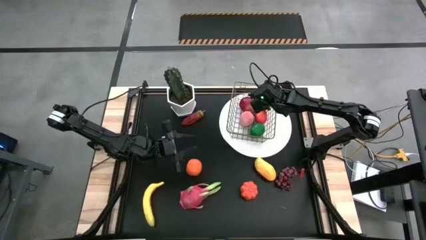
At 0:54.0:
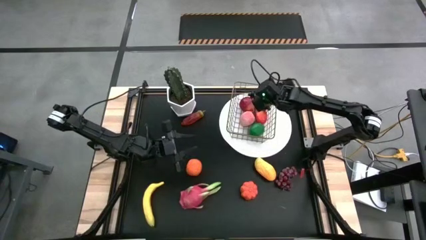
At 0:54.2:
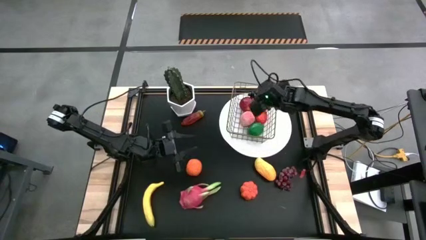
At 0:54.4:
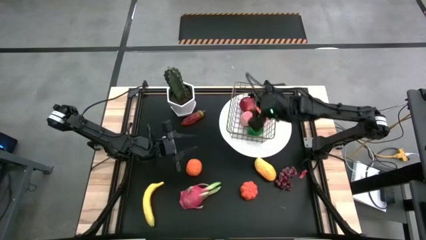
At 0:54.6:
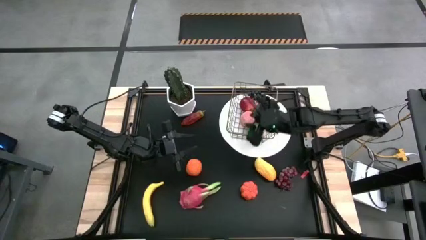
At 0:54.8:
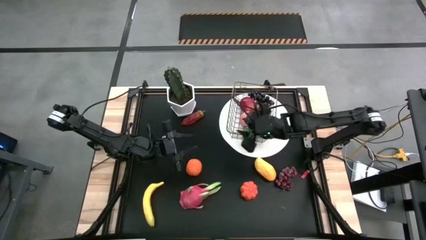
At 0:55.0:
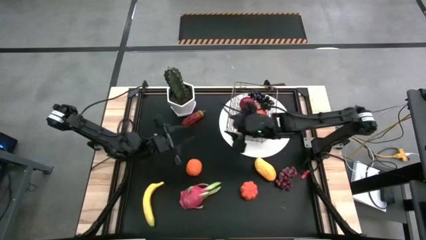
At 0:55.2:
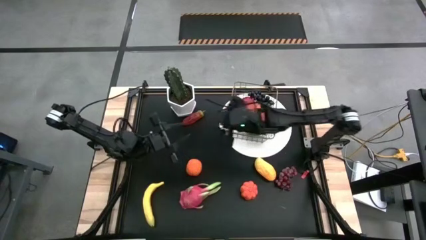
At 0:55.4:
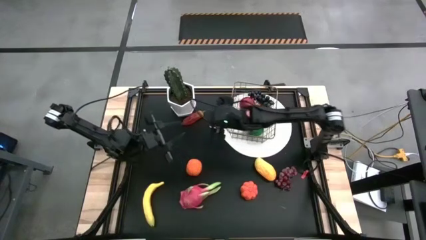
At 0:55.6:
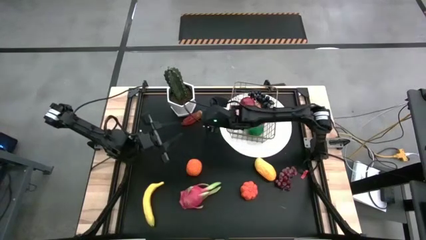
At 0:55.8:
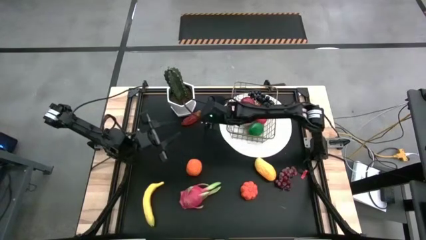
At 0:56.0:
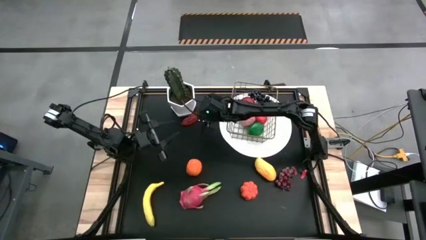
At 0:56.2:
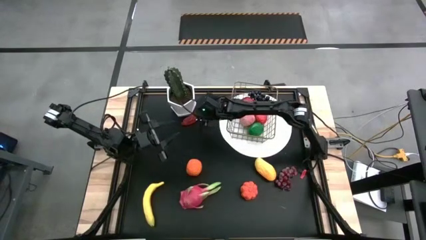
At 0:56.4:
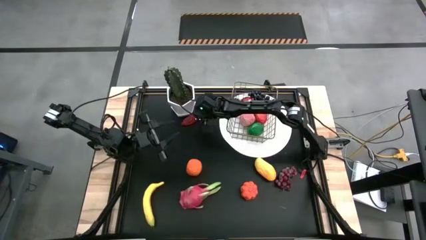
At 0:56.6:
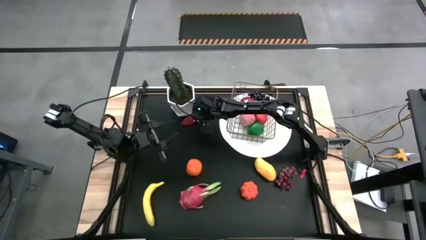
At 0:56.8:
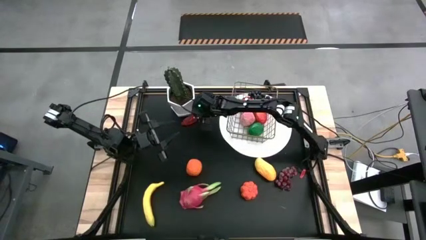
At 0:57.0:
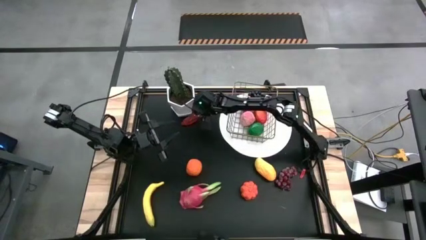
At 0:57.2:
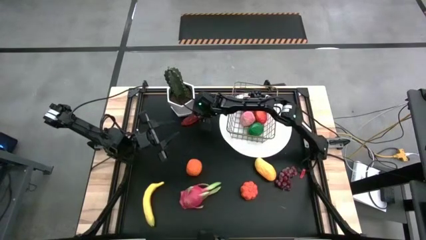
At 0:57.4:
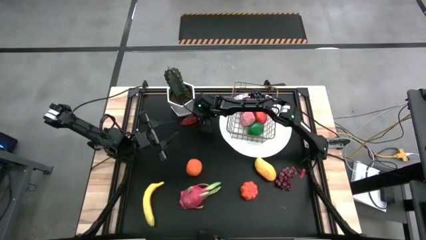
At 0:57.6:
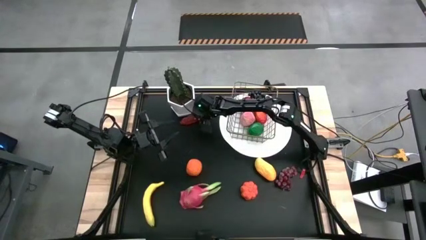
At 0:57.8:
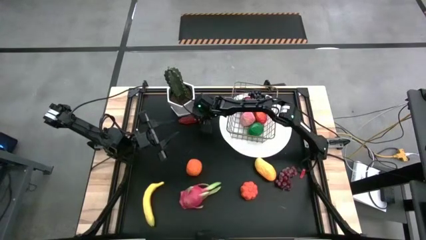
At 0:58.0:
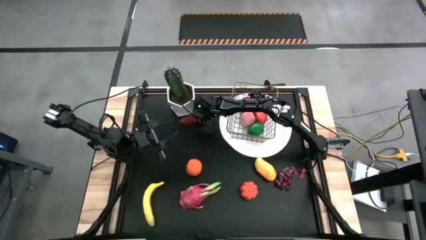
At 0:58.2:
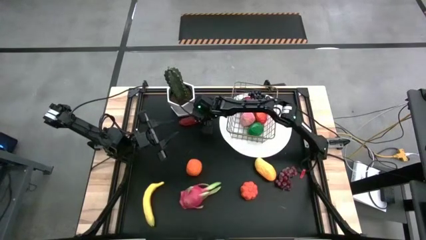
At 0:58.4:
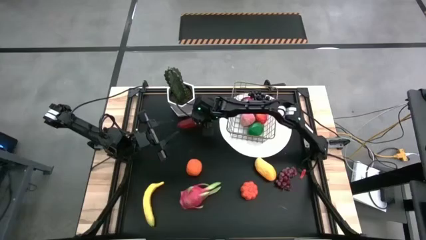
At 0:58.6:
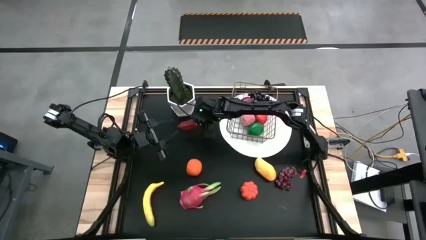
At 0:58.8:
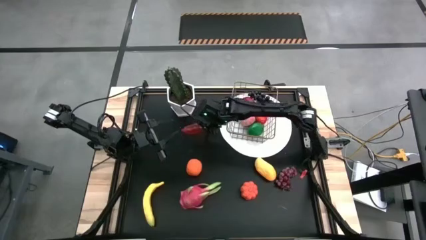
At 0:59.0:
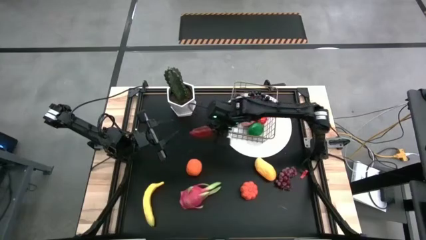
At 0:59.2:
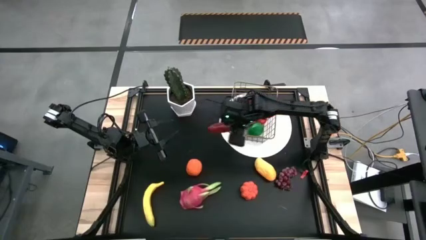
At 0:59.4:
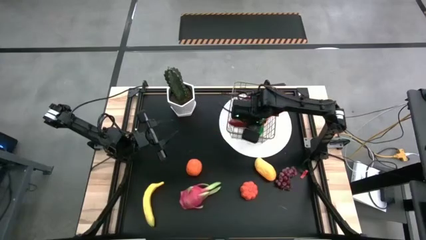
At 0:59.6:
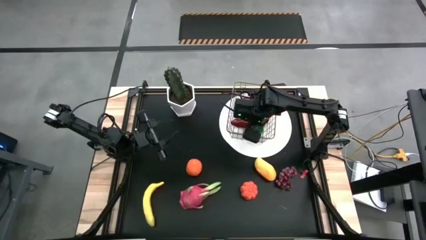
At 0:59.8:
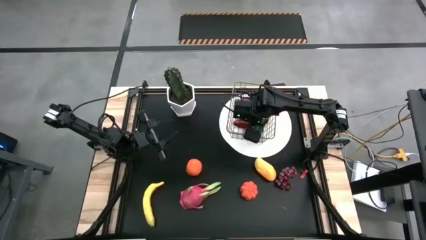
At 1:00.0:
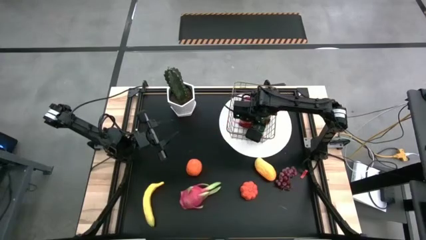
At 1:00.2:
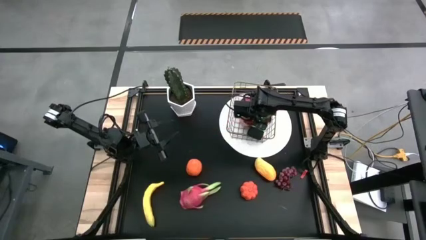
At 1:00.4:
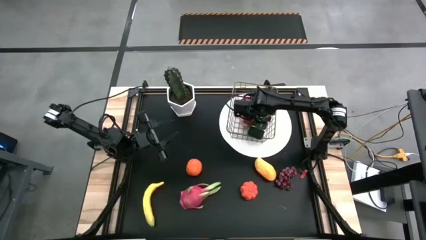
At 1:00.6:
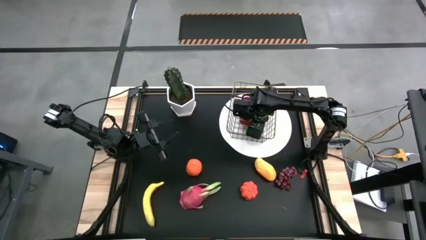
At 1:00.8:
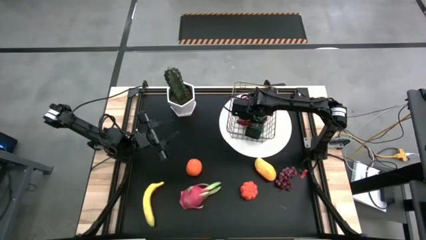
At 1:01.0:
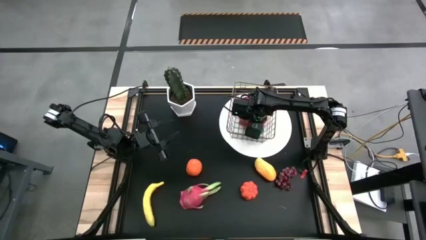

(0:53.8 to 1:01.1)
Task: Build produce basket
Put the chili pepper into the wire basket

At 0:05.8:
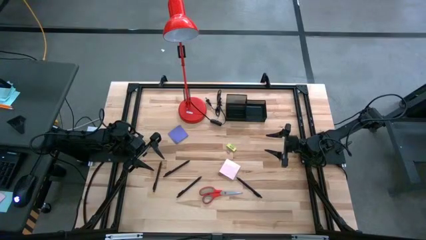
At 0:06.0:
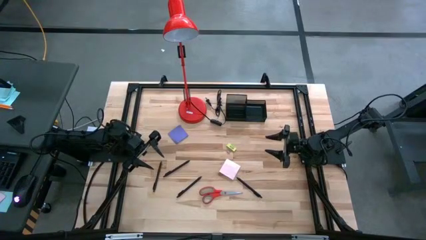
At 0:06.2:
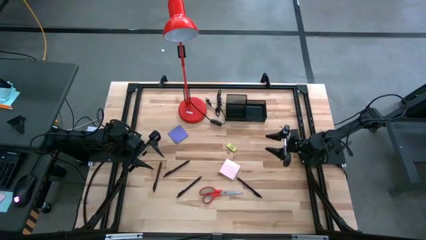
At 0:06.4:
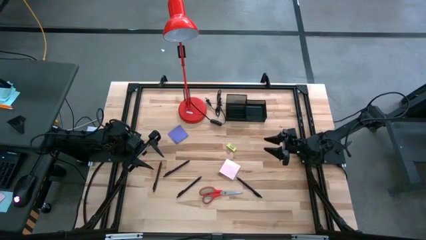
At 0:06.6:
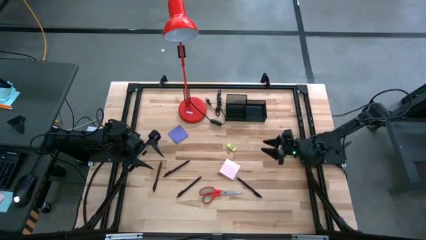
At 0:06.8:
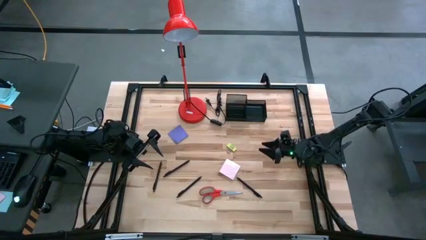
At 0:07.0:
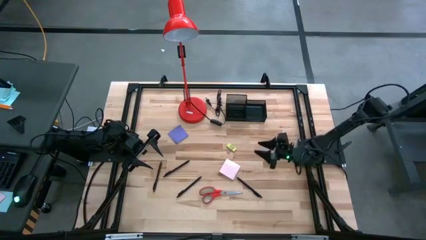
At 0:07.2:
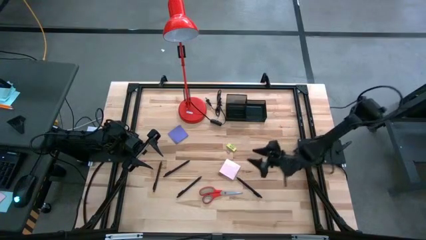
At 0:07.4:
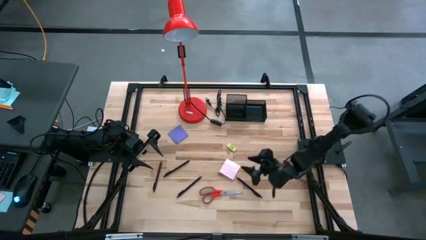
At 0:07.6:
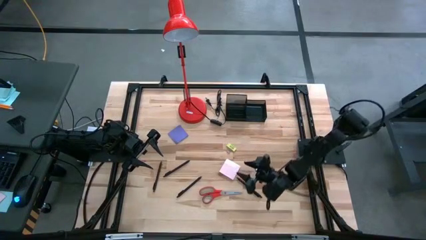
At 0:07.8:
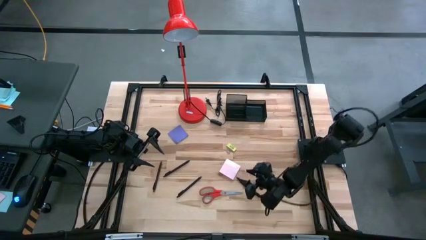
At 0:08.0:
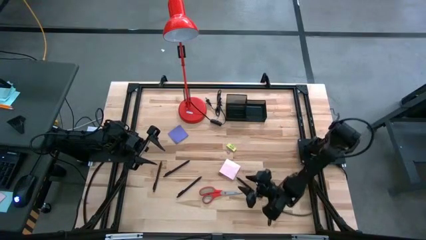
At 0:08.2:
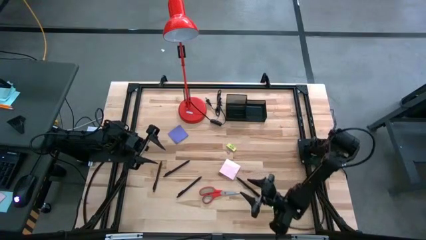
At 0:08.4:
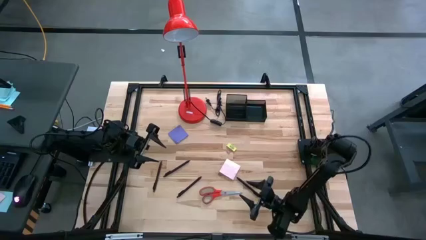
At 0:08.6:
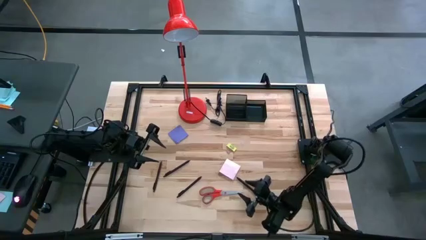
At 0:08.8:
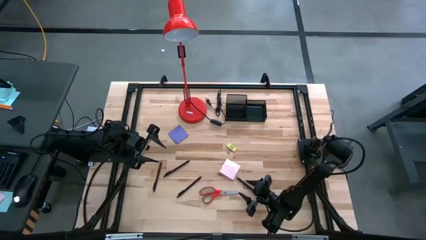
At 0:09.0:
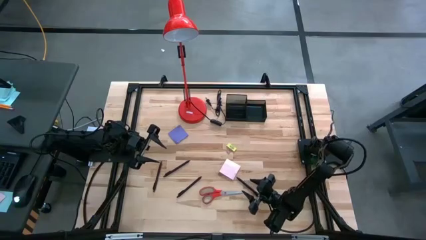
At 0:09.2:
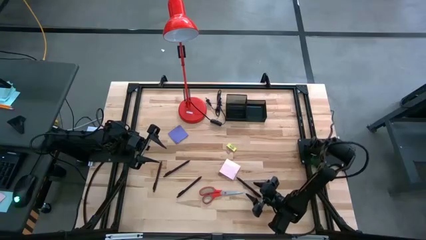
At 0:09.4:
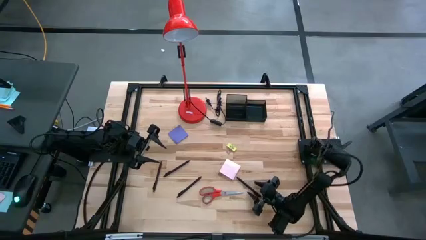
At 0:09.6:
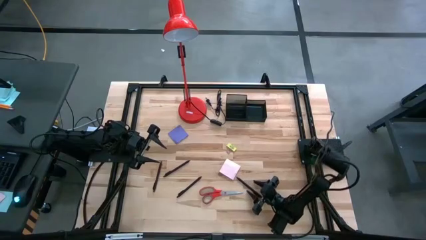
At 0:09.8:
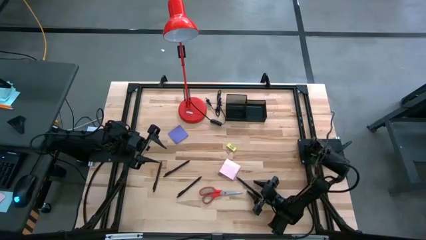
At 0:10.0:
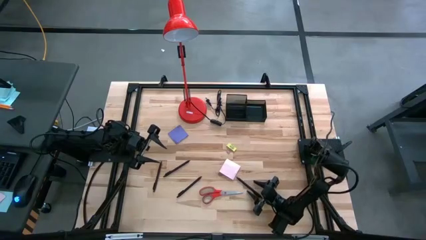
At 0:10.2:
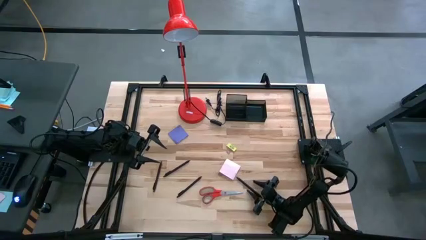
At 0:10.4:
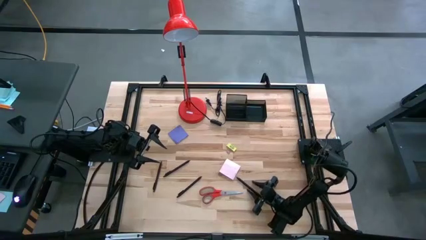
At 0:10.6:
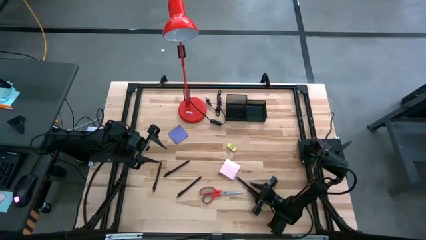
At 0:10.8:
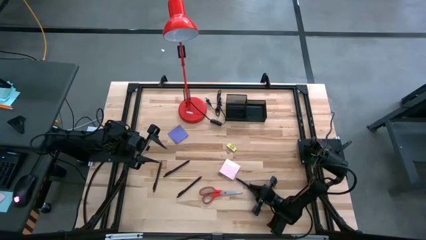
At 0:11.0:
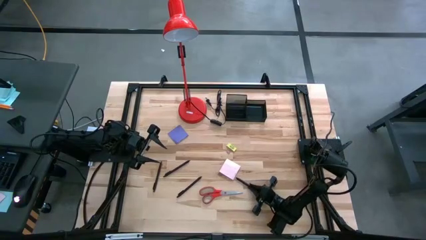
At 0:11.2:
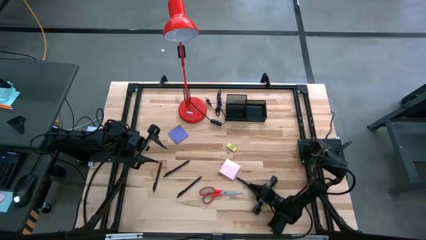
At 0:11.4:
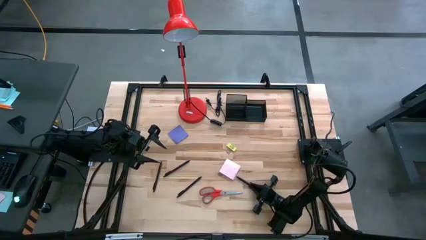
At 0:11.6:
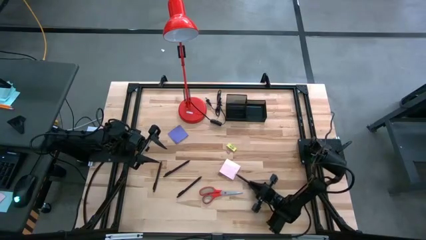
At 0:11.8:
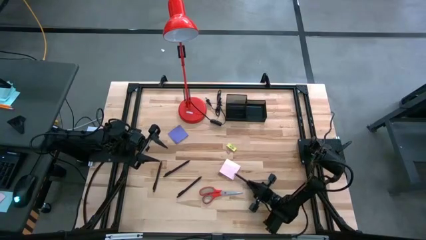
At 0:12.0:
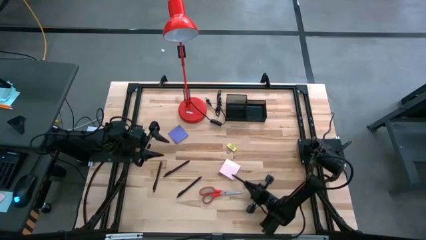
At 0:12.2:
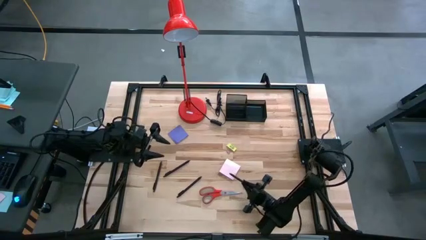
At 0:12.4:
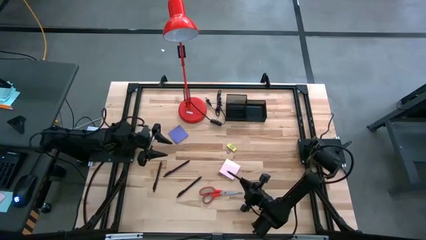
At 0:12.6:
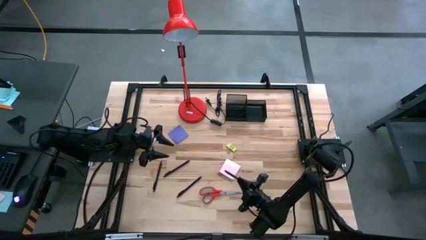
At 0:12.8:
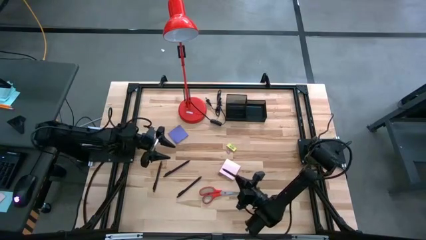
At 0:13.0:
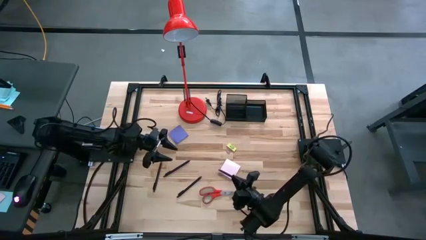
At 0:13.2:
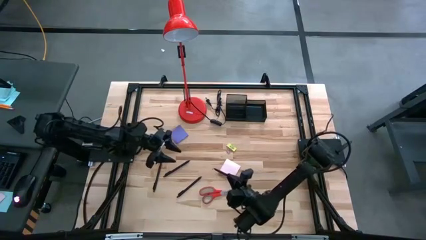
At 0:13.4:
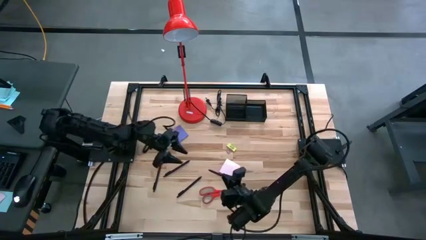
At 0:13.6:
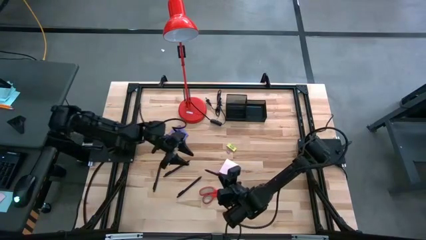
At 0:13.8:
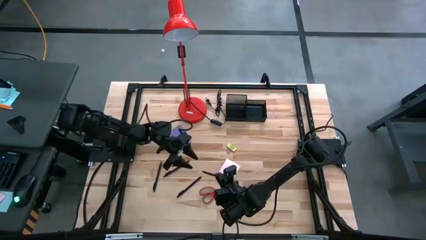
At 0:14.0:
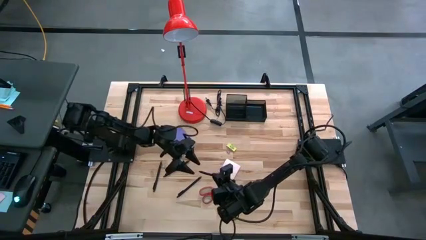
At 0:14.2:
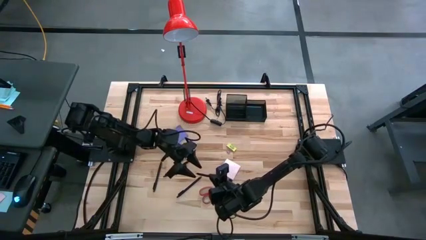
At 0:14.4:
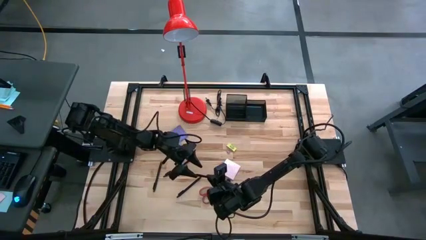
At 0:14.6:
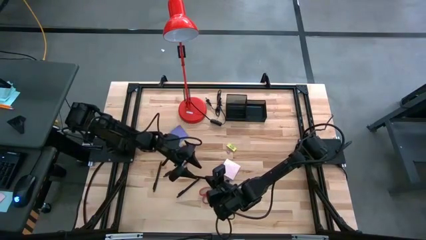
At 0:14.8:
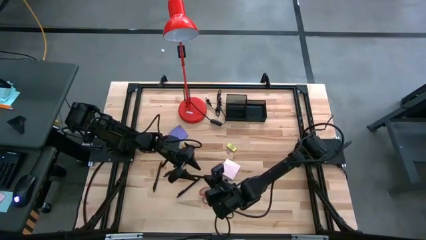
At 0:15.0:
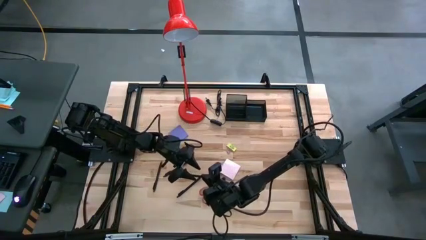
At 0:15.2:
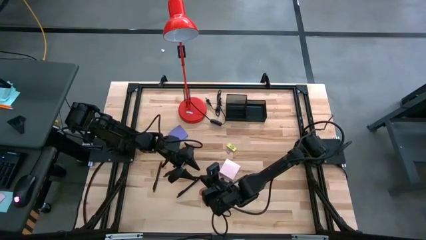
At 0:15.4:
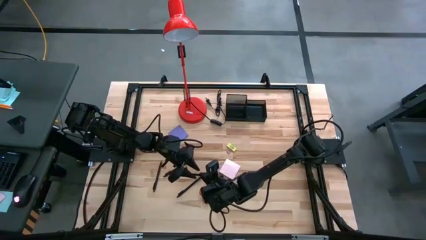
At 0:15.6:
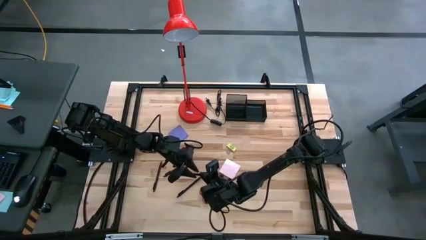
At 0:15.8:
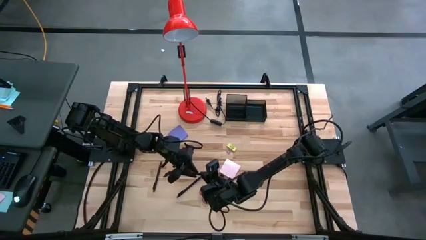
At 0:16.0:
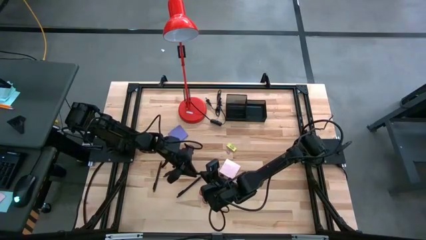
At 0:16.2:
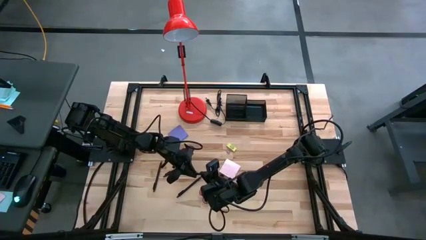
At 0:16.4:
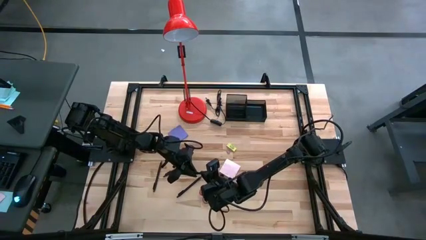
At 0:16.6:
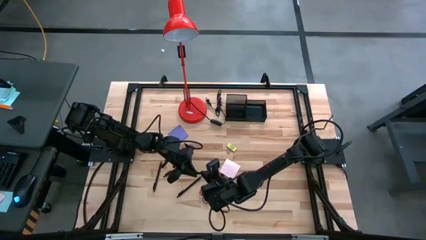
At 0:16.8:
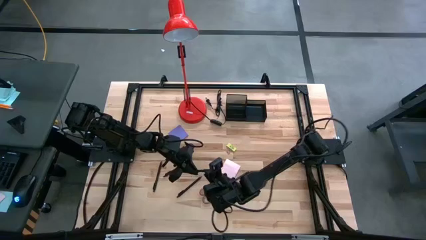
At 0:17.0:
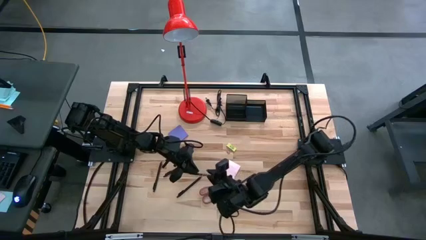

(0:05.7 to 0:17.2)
Task: Pick and place office supplies into organizer
Put the black pen into the black desk organizer
